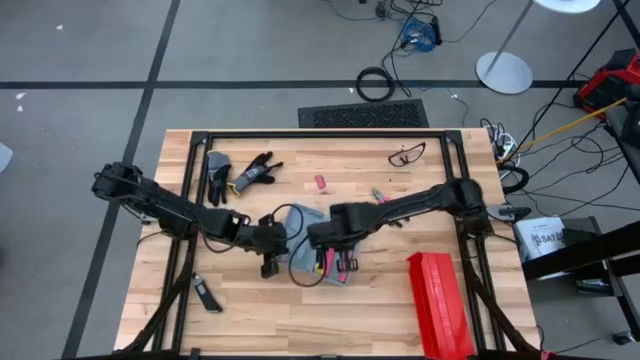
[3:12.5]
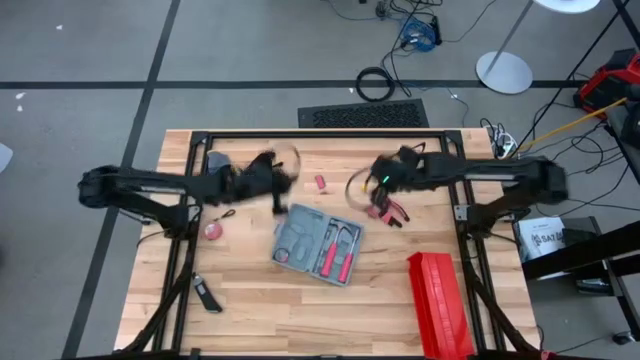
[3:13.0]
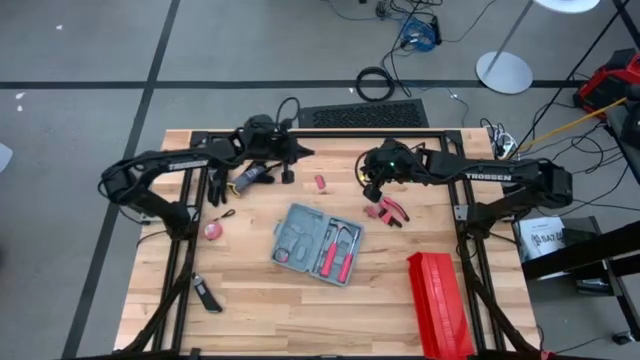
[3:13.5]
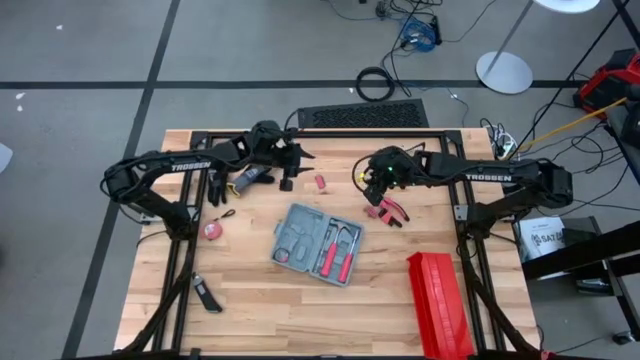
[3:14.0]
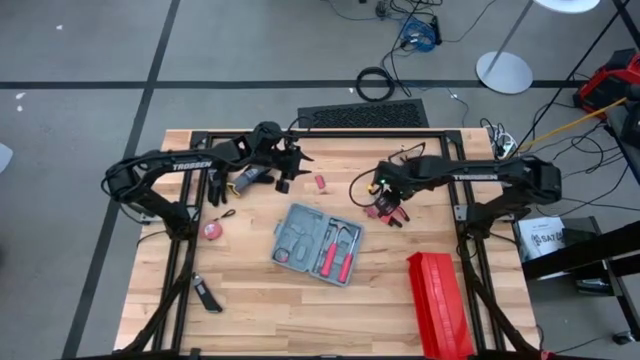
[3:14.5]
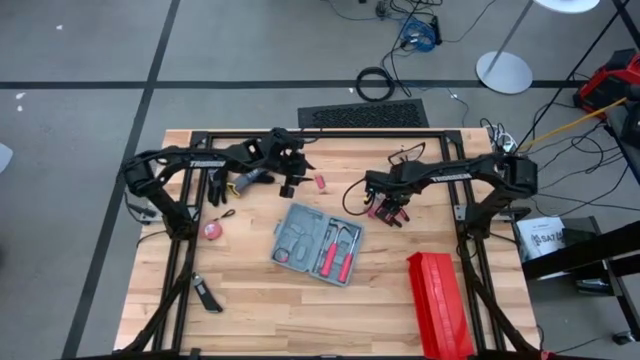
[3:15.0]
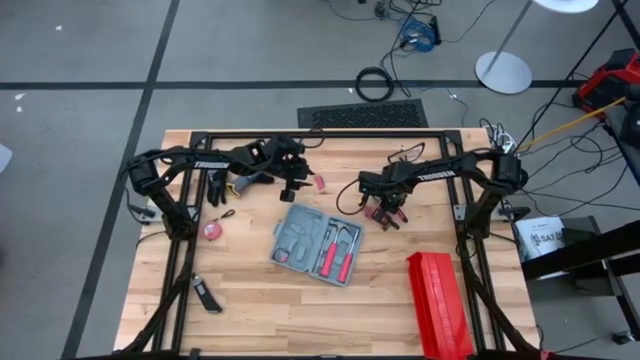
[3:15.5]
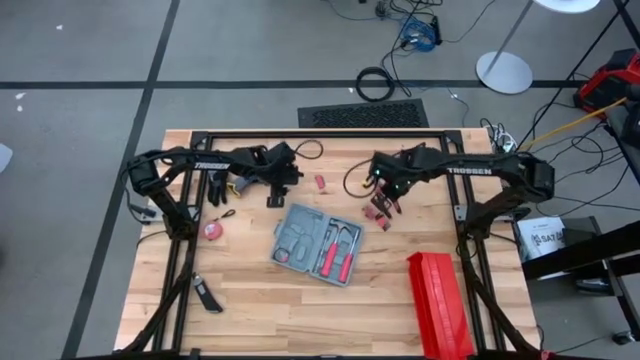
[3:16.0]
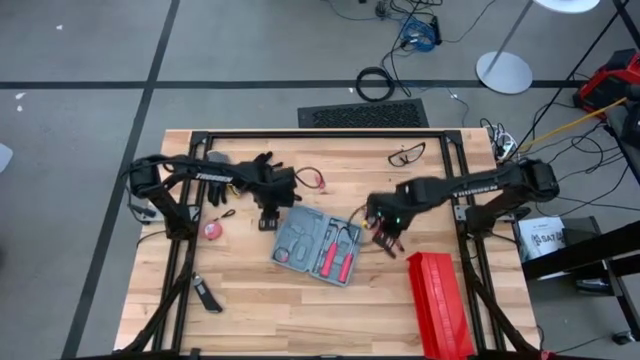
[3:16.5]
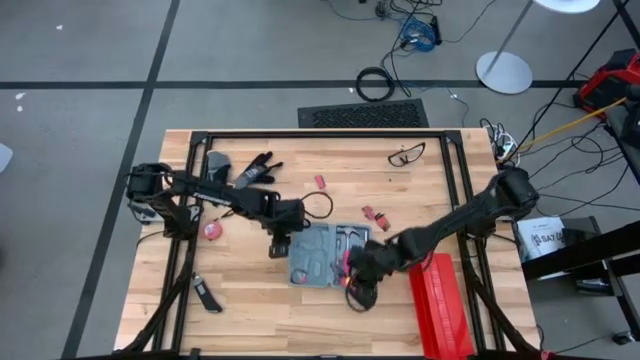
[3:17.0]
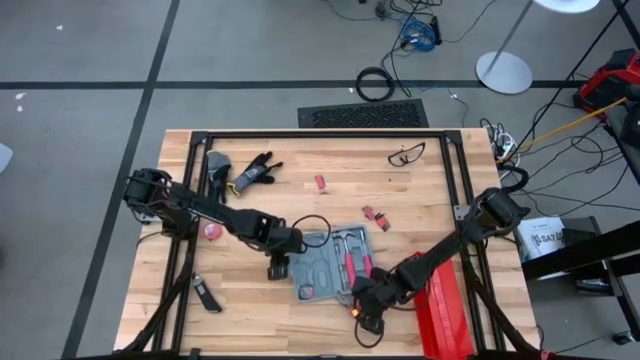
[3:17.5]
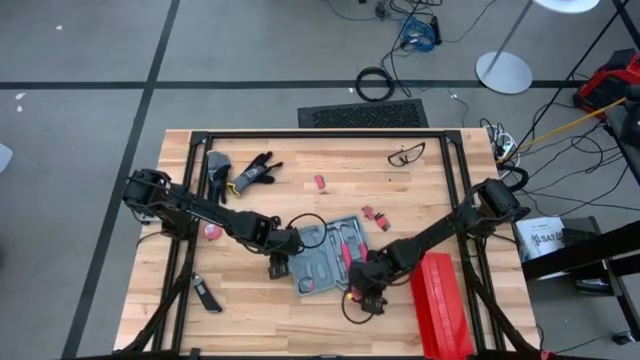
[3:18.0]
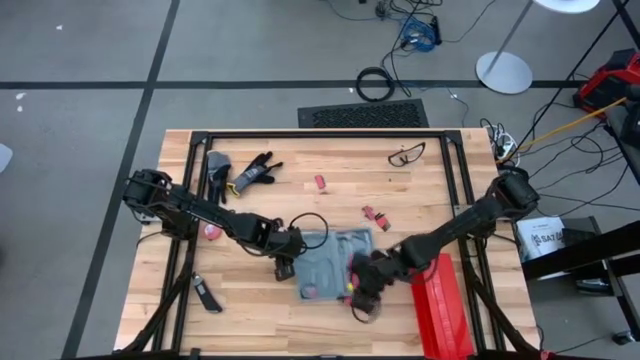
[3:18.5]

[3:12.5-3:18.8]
Task: prefit tool cases
Put the red pliers into the gray prefit tools case

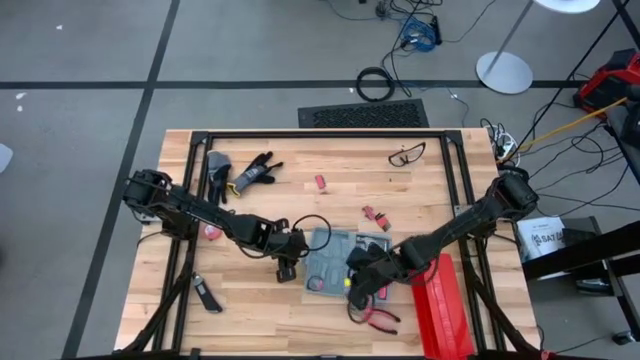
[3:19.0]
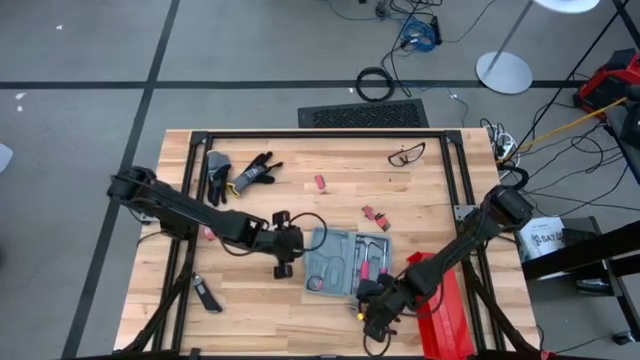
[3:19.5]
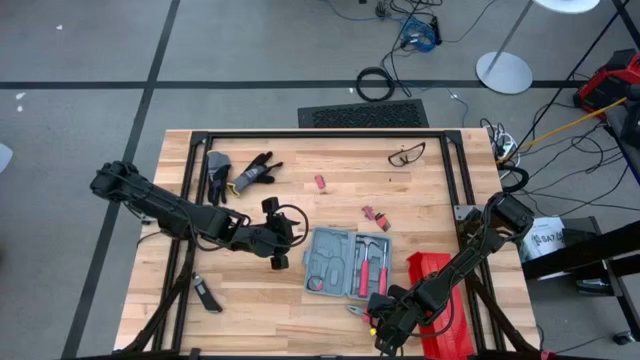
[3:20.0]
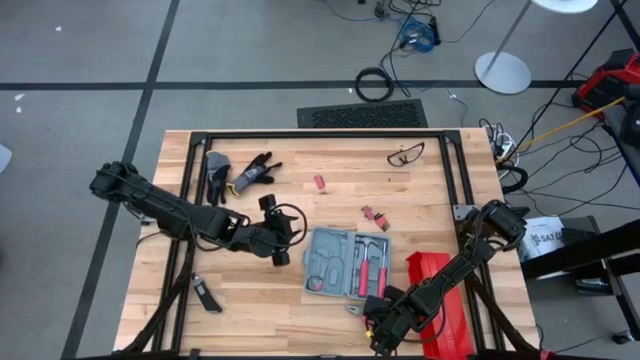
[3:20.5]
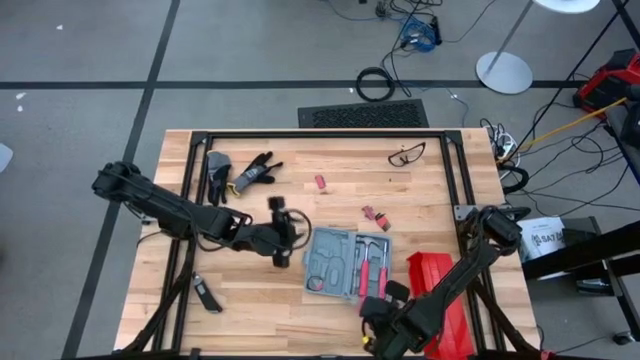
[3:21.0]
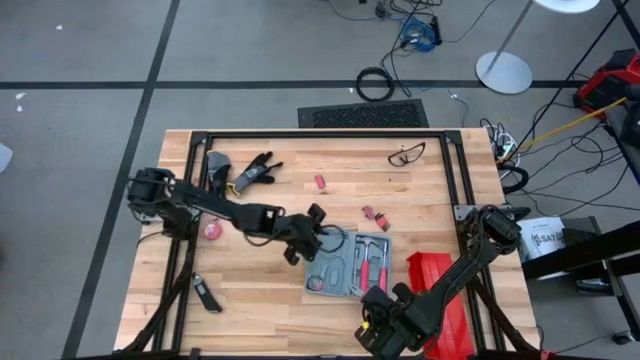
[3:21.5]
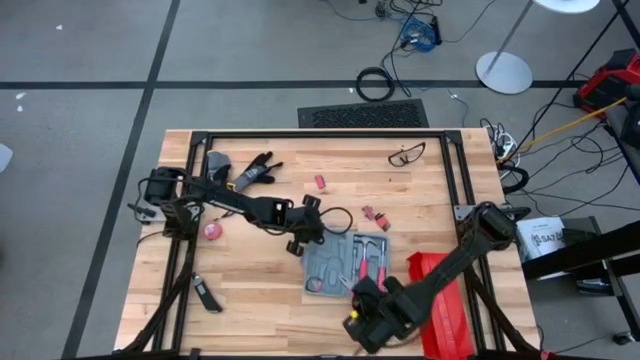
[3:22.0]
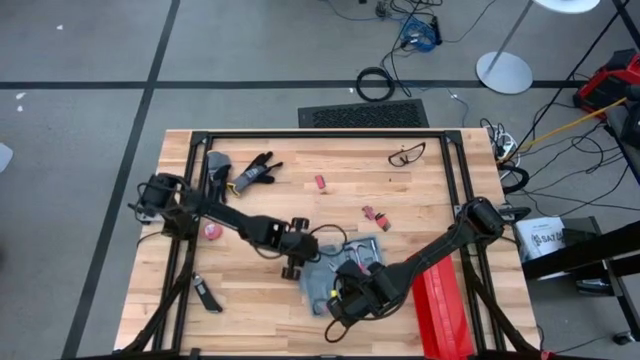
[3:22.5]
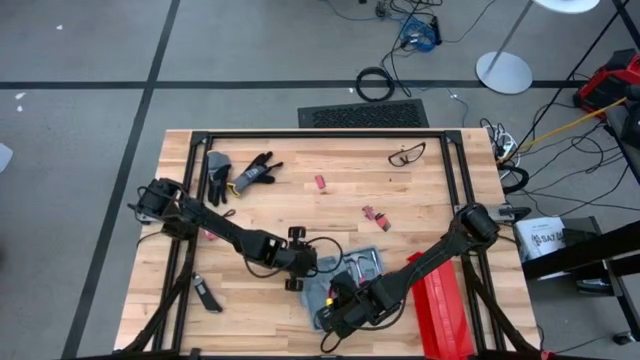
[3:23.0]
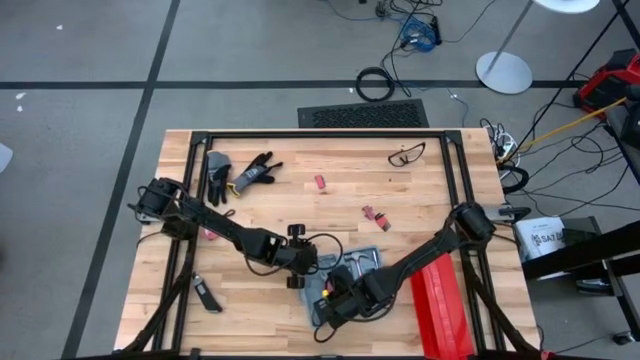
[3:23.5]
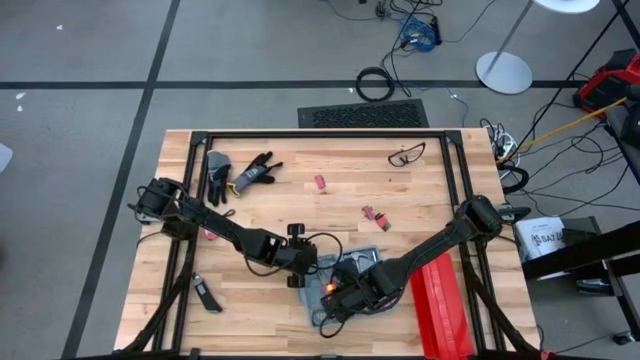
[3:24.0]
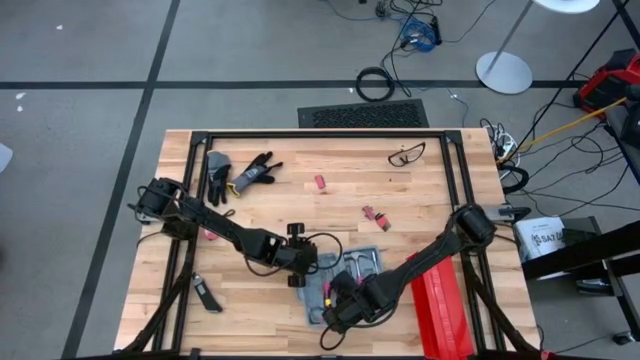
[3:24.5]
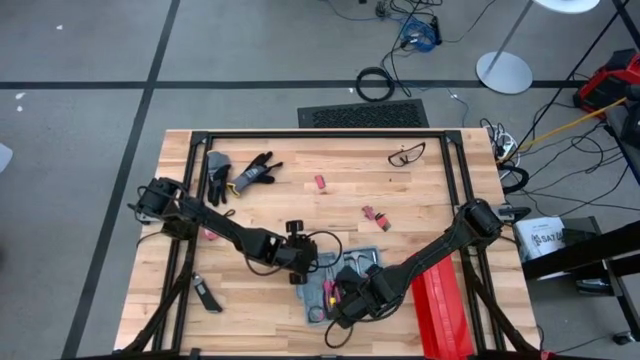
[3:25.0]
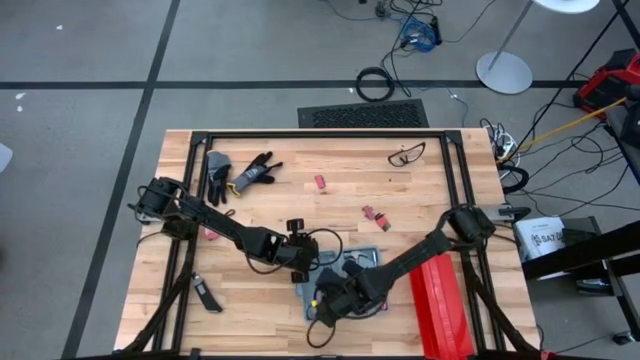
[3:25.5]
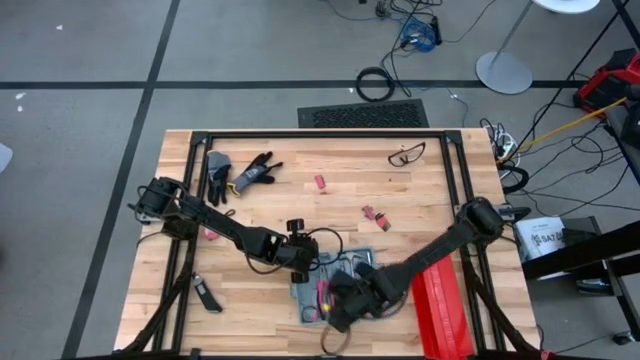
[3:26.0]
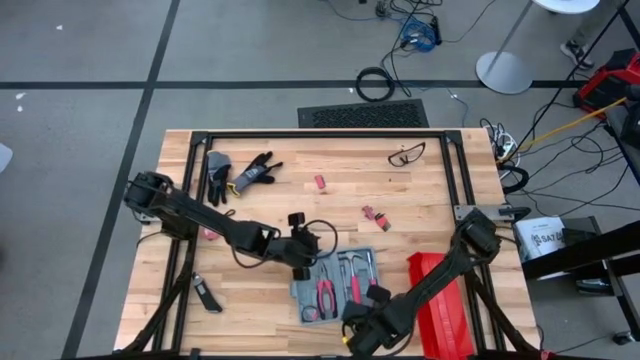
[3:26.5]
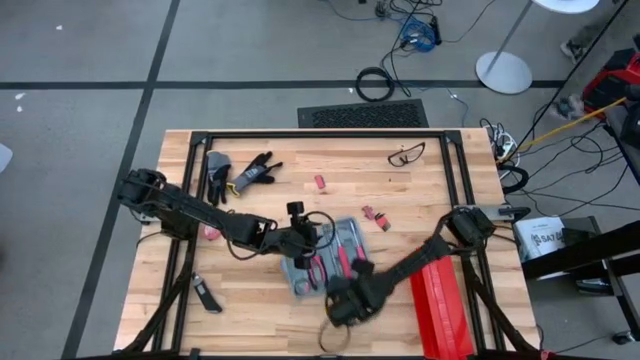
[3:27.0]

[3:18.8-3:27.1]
Put the red pliers into the gray prefit tools case

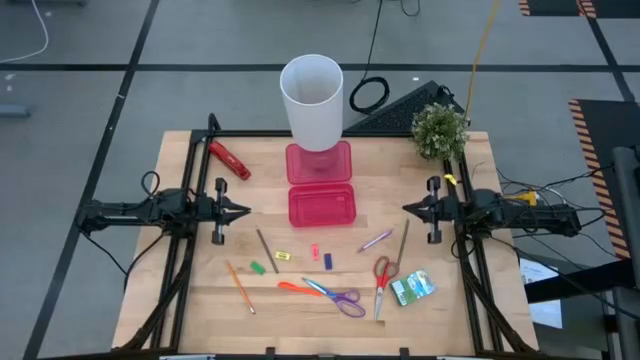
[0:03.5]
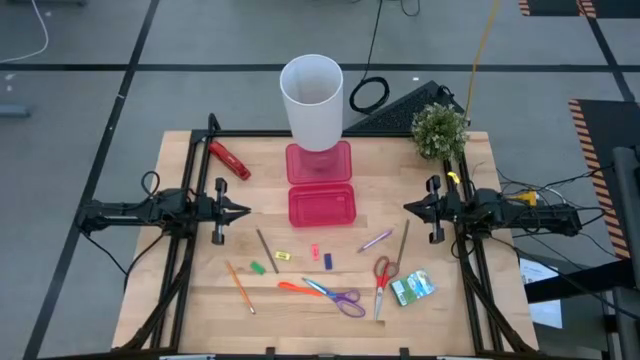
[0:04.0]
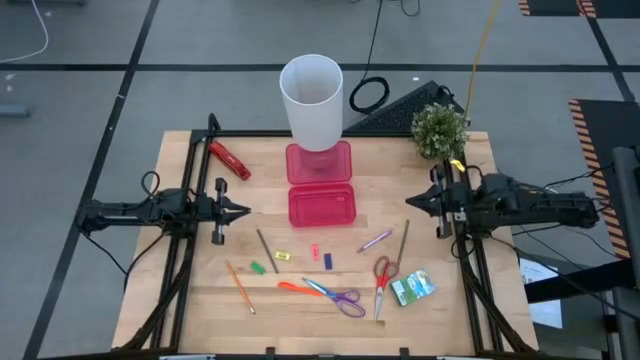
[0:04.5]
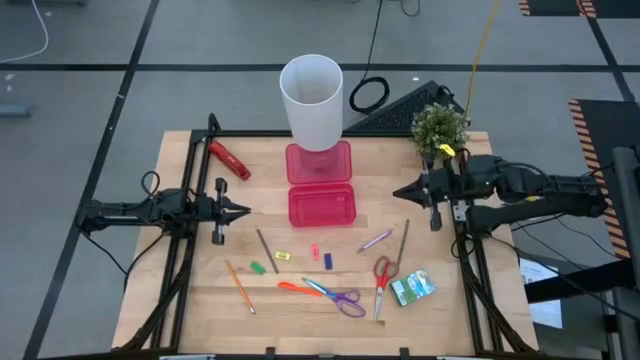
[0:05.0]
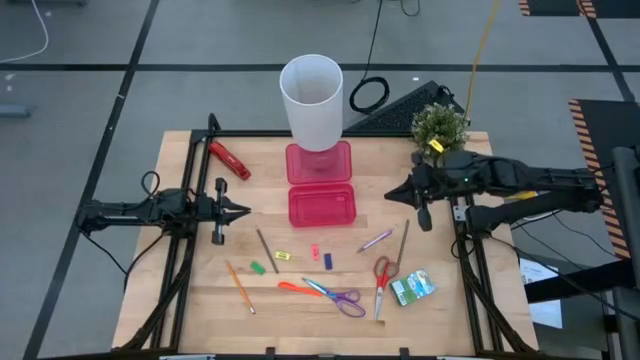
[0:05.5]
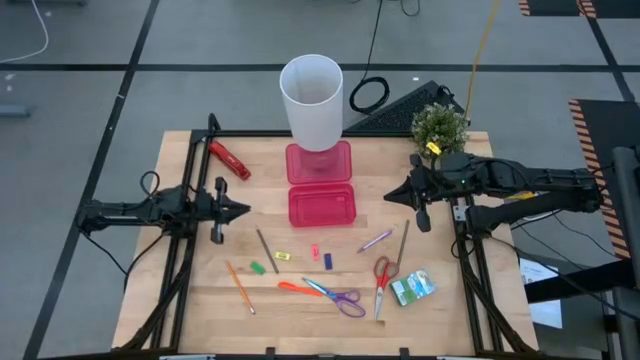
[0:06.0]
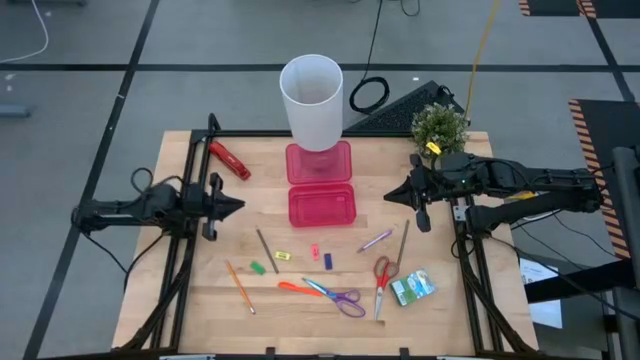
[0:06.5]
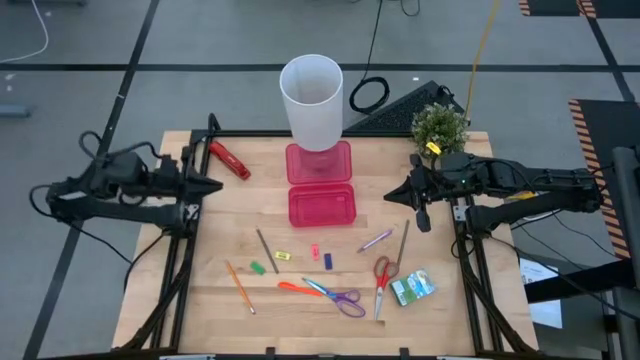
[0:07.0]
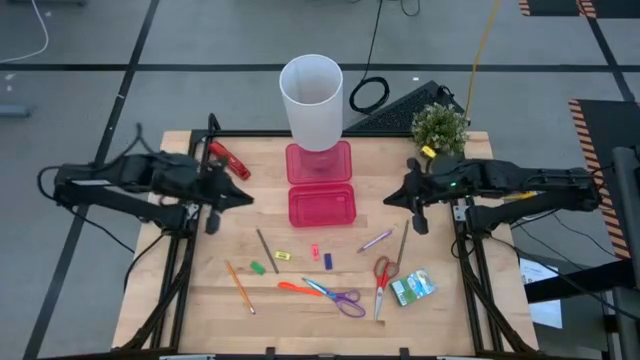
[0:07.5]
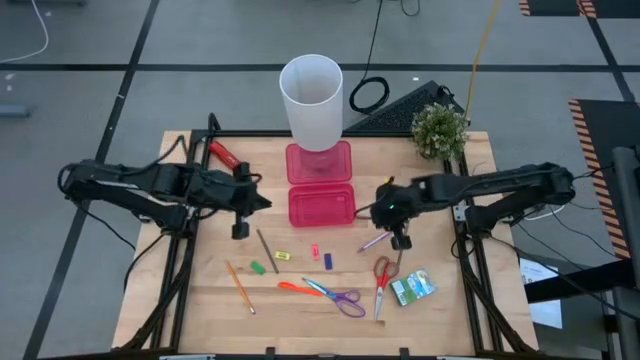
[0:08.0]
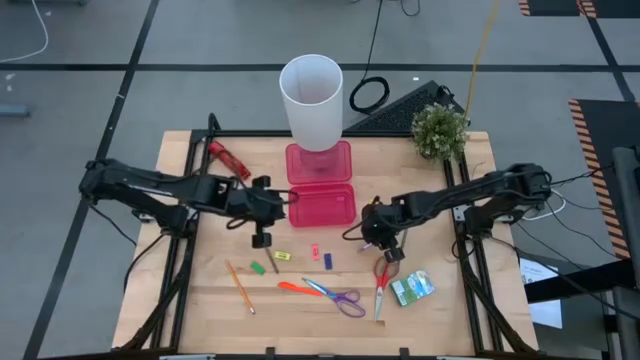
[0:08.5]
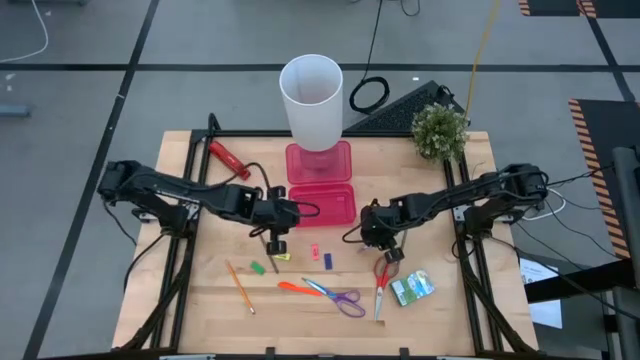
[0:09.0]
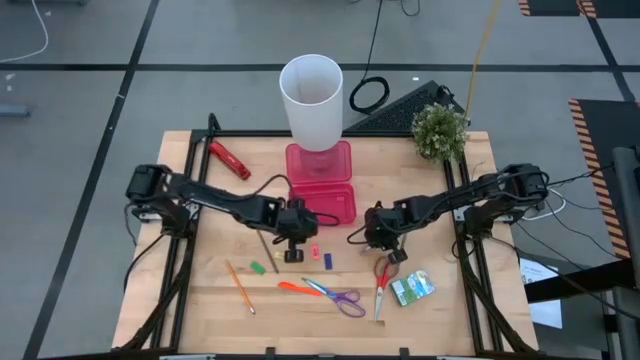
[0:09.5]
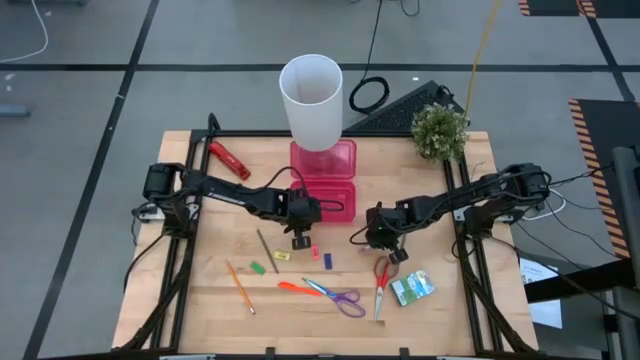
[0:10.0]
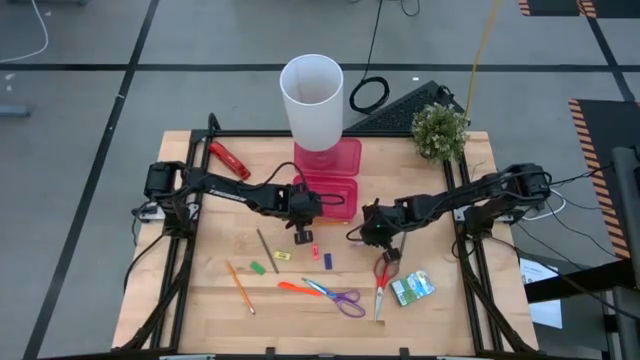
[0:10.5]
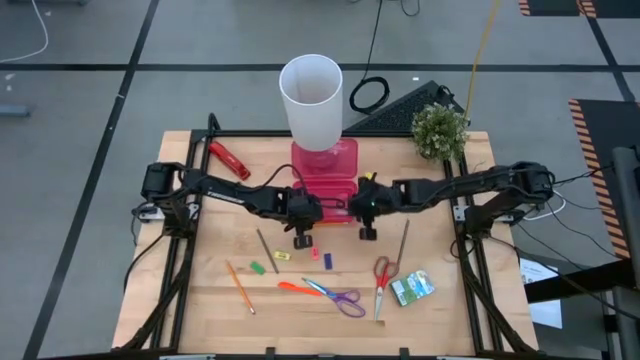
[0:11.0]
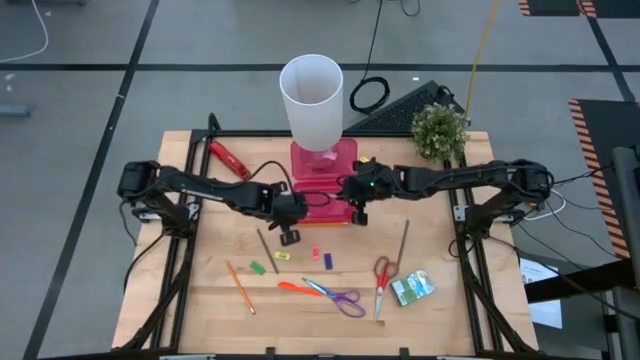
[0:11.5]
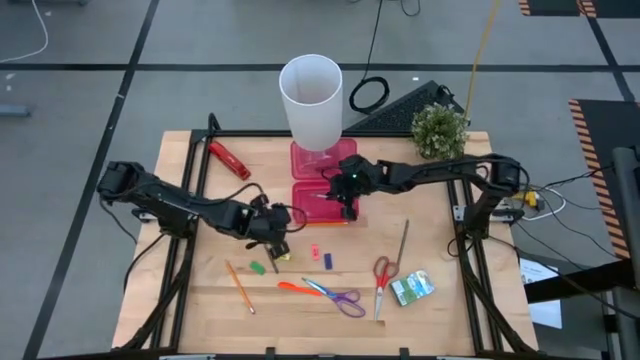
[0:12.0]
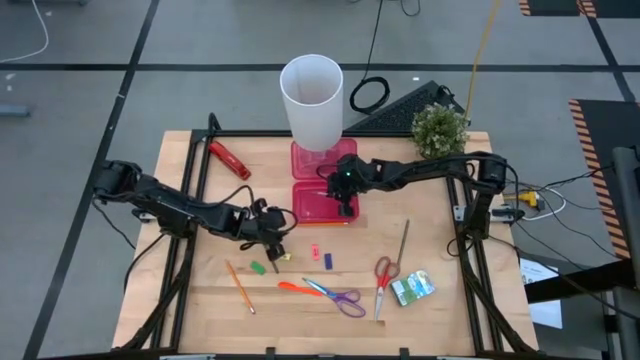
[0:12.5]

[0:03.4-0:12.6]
Task: Pack school essentials
Put the purple pen into the pink supply box
